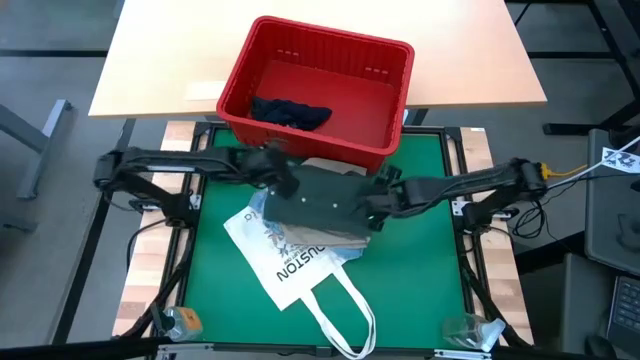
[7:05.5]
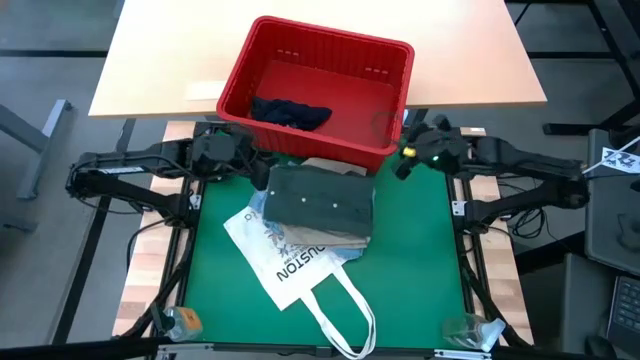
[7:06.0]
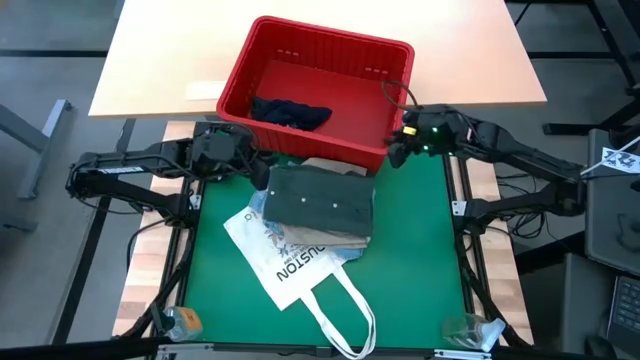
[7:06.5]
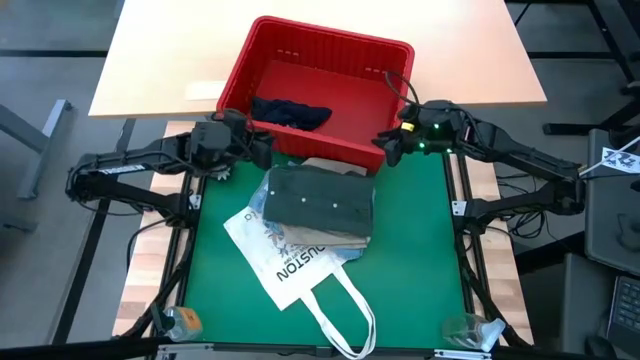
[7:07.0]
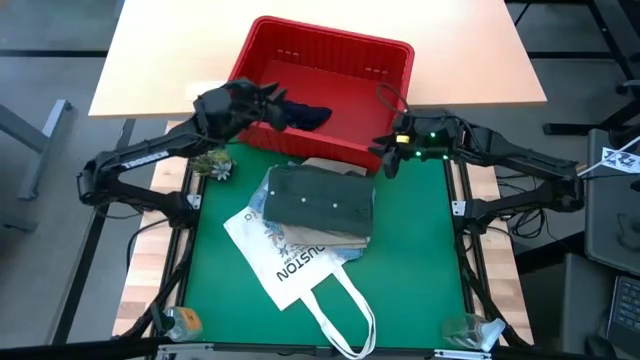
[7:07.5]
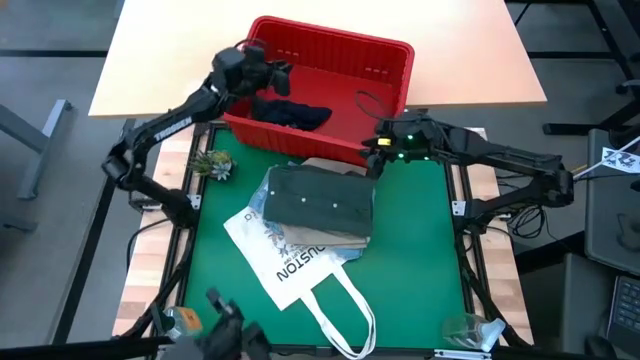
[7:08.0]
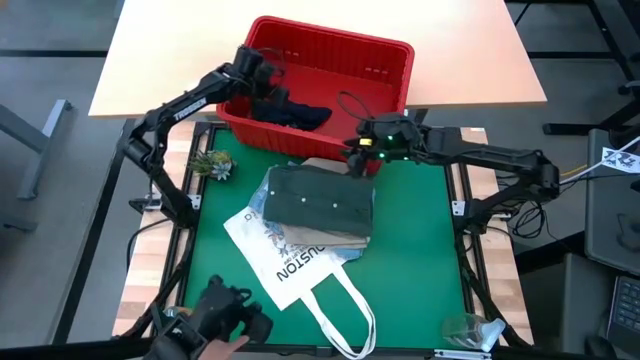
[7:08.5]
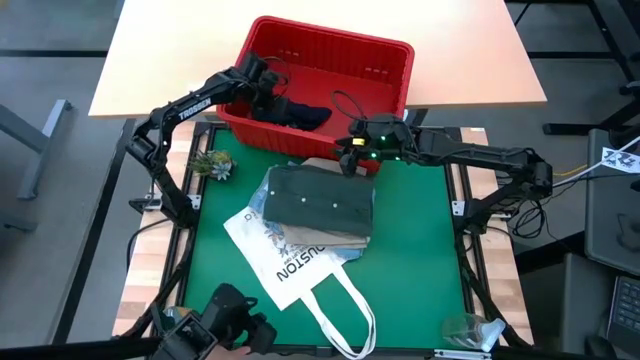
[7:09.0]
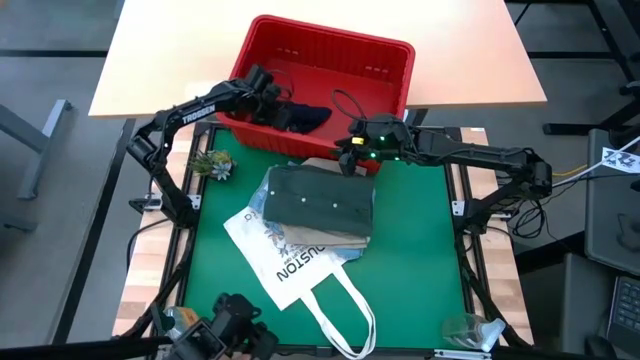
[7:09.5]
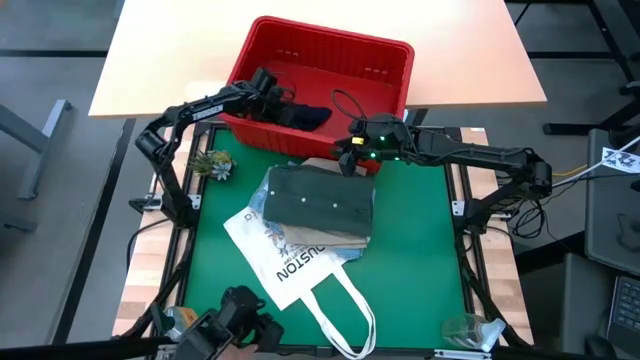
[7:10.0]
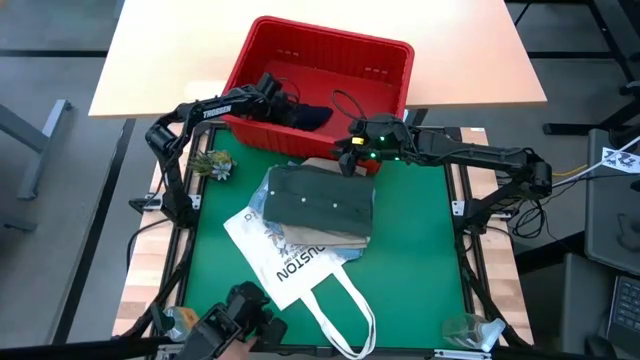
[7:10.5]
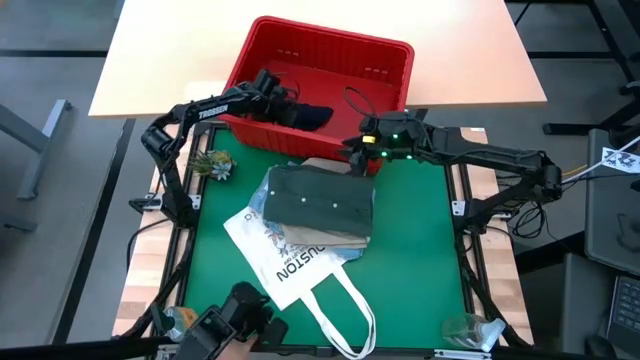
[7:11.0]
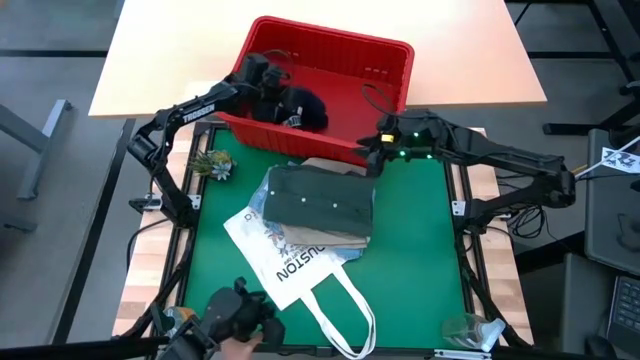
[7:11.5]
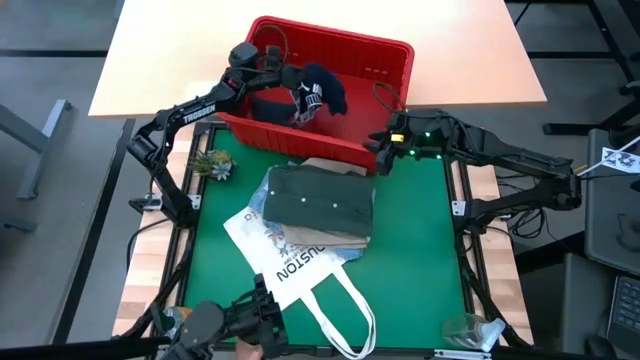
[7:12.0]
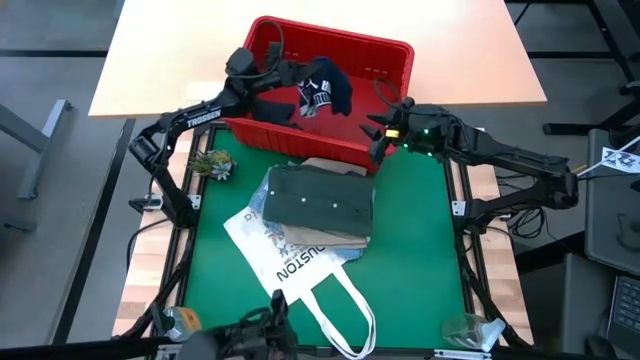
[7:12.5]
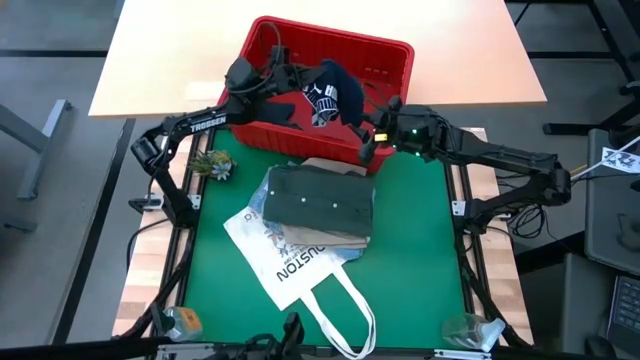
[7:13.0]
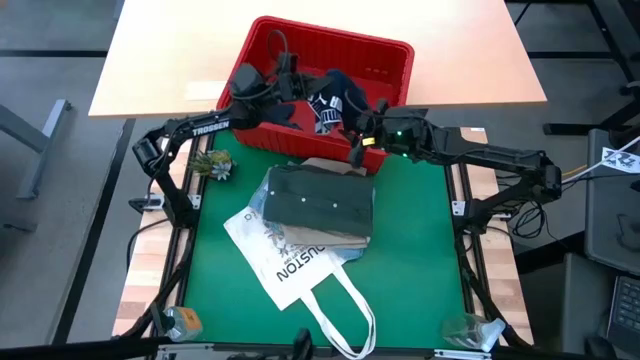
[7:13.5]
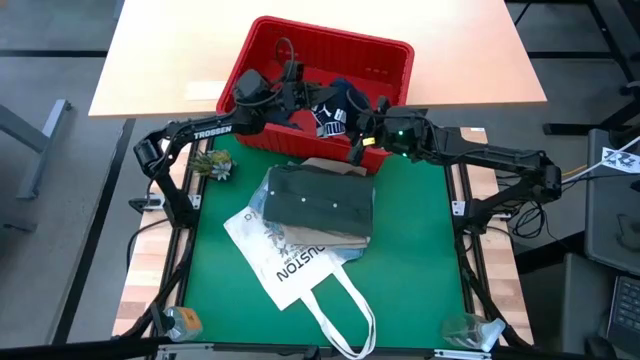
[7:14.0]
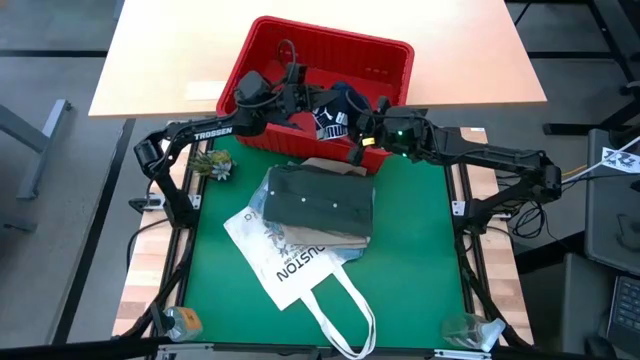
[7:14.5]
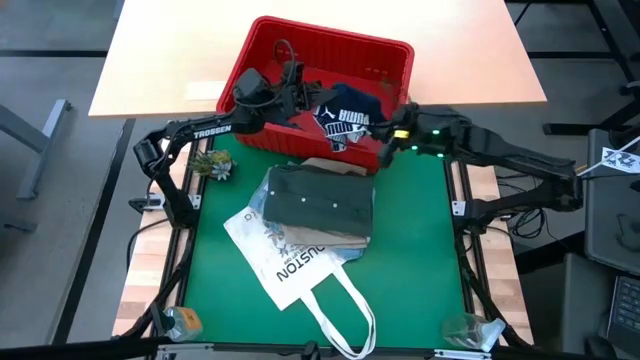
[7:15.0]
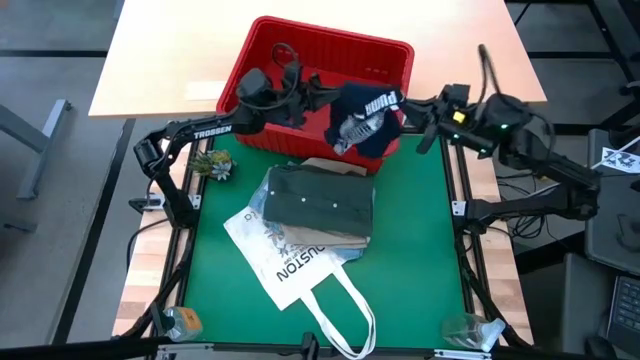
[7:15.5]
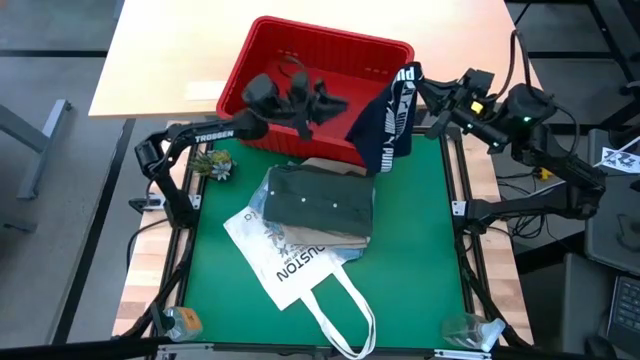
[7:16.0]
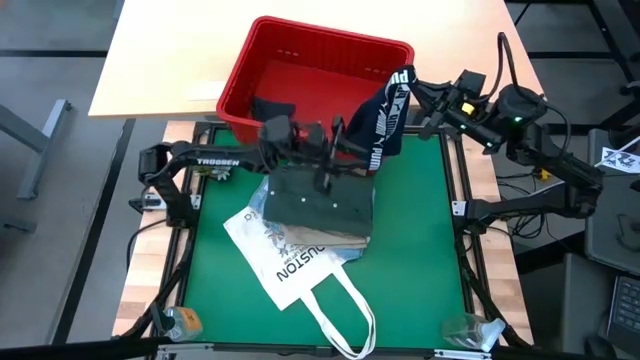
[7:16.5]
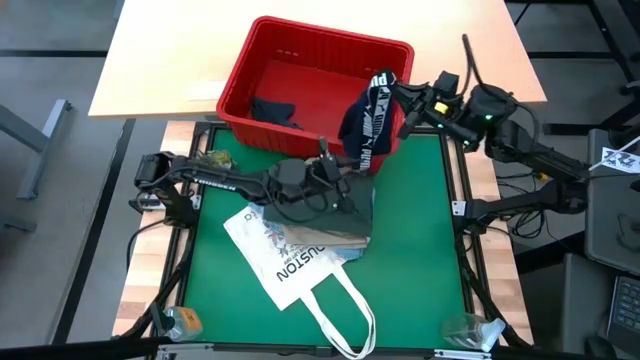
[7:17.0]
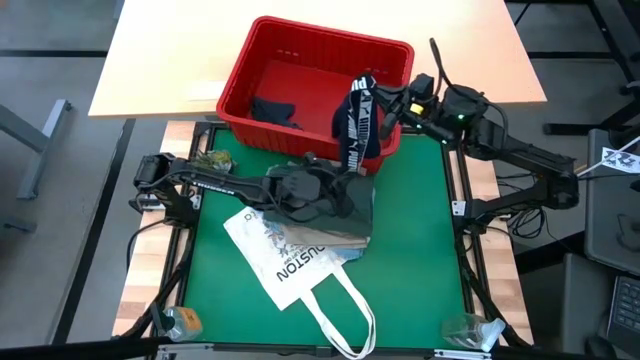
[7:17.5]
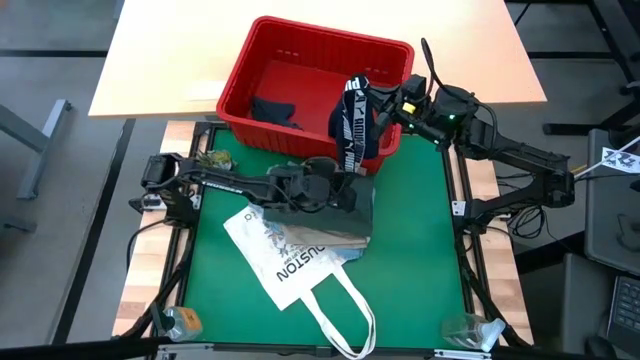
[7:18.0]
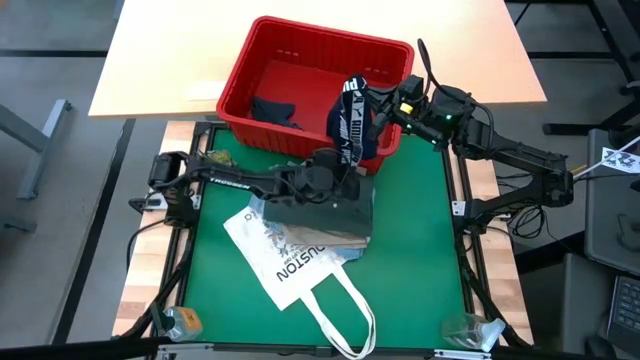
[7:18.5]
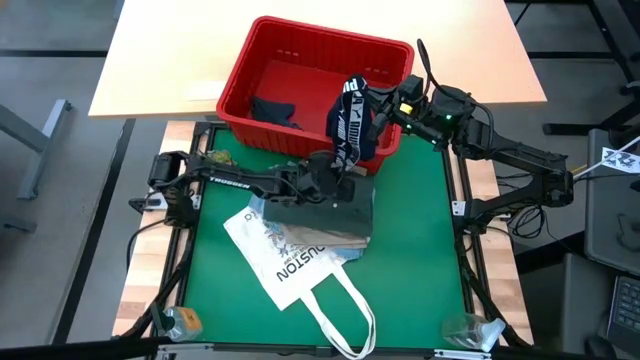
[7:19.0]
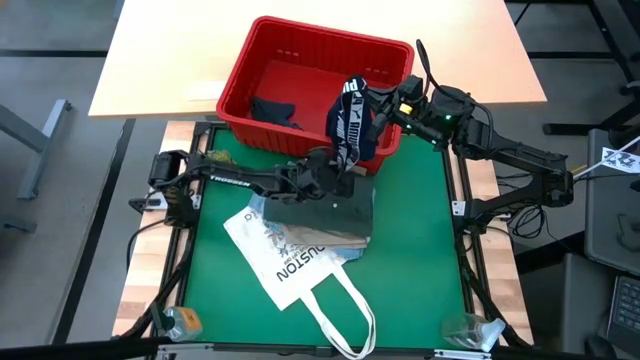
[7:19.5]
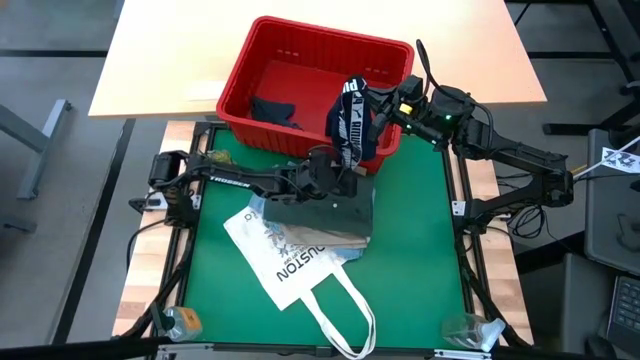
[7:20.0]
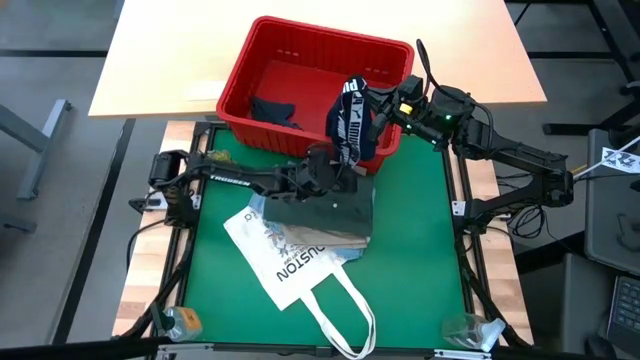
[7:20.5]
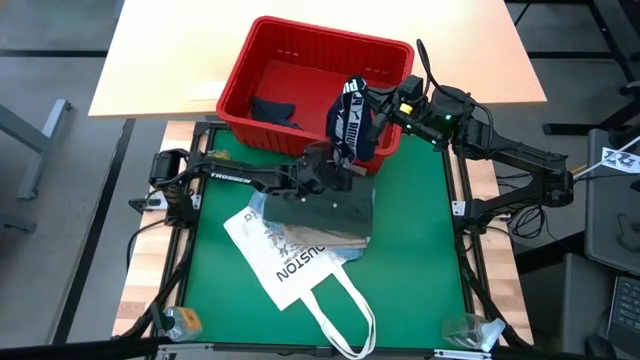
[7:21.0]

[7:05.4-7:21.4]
Task: Fold Laundry from Bin
Fold the dark blue boxers
